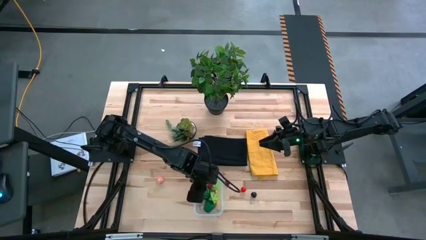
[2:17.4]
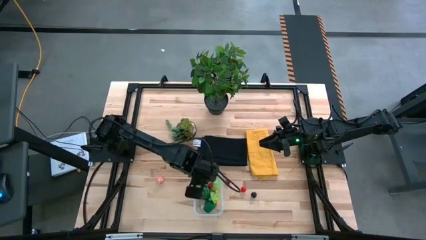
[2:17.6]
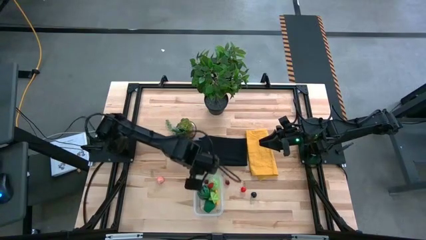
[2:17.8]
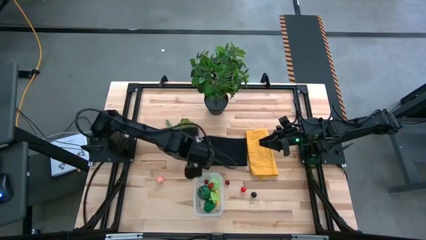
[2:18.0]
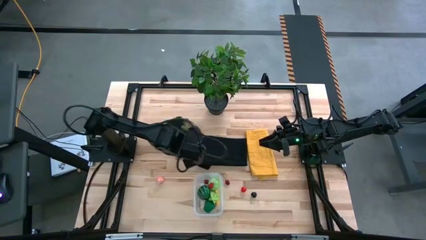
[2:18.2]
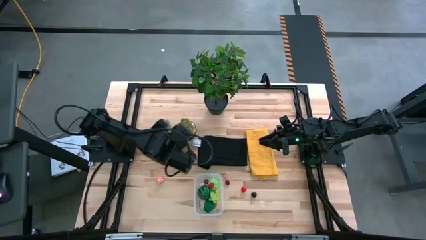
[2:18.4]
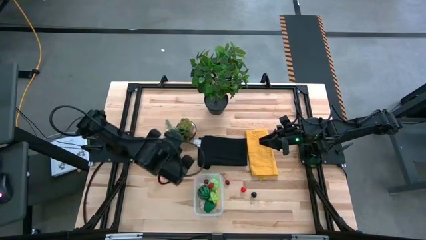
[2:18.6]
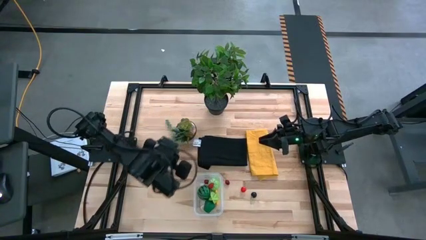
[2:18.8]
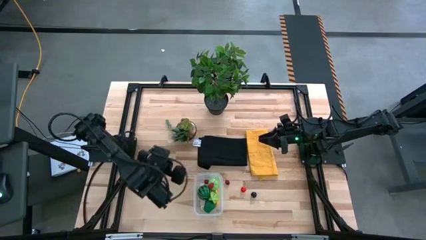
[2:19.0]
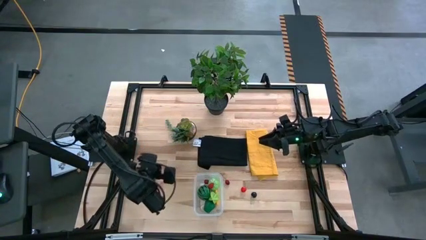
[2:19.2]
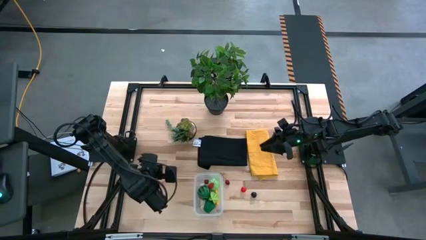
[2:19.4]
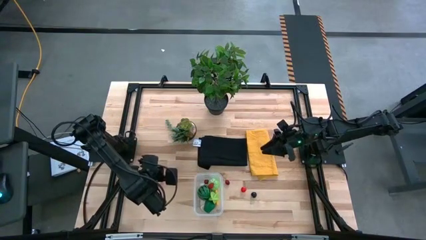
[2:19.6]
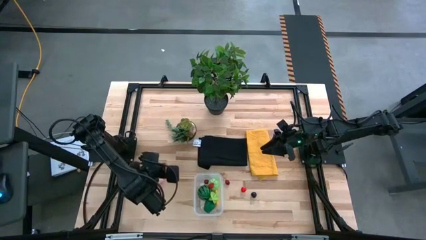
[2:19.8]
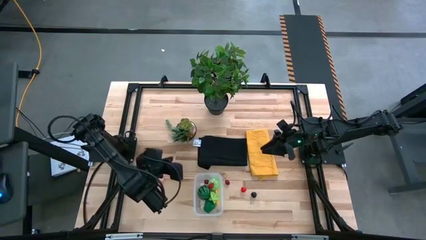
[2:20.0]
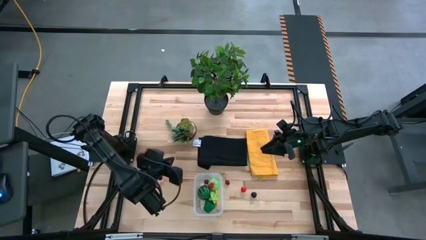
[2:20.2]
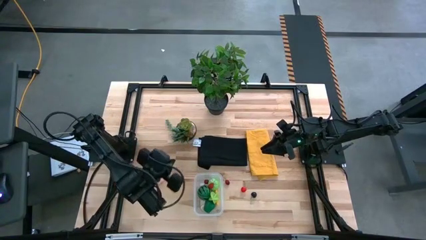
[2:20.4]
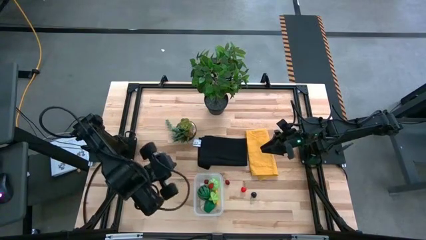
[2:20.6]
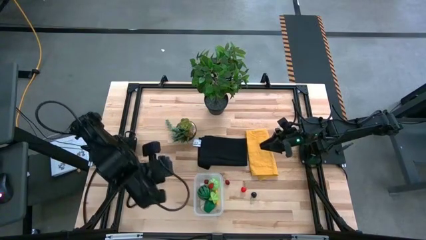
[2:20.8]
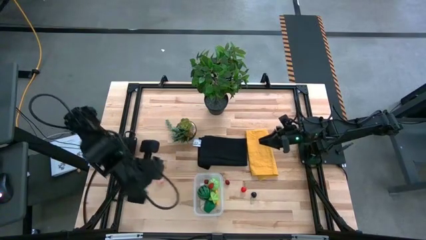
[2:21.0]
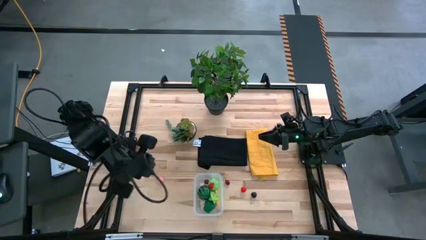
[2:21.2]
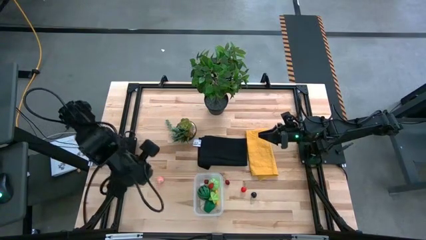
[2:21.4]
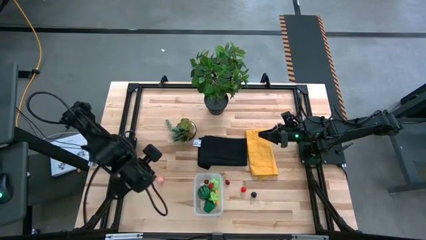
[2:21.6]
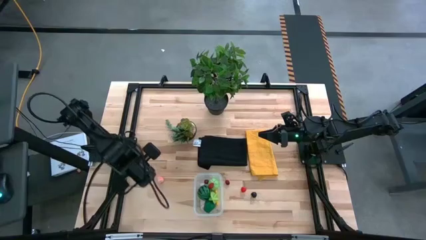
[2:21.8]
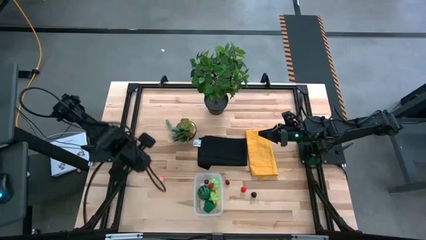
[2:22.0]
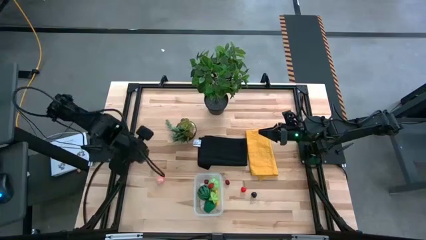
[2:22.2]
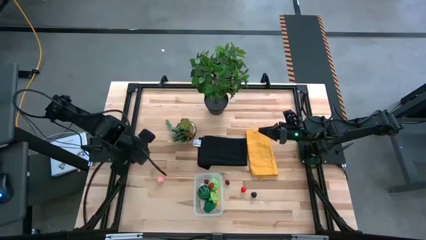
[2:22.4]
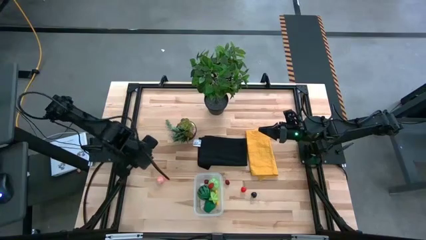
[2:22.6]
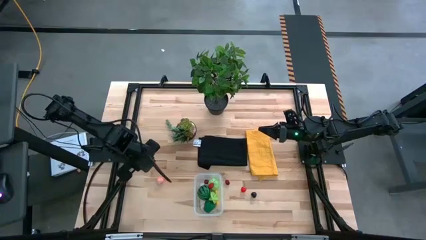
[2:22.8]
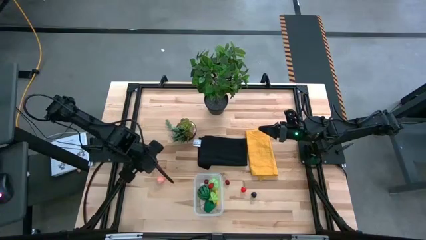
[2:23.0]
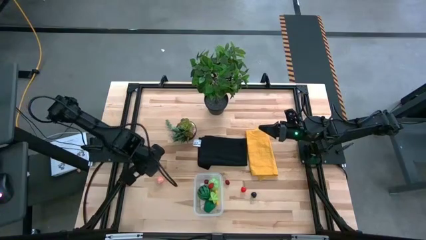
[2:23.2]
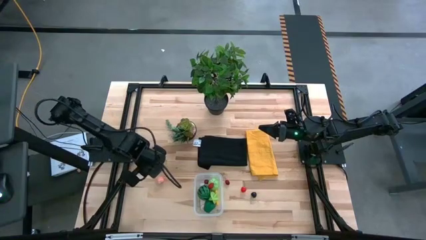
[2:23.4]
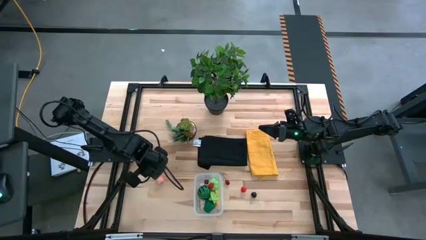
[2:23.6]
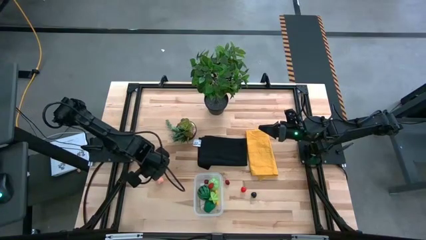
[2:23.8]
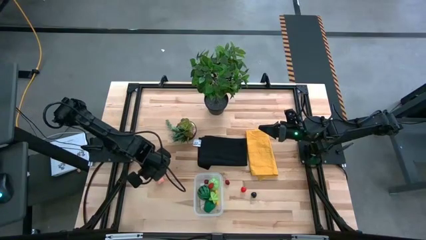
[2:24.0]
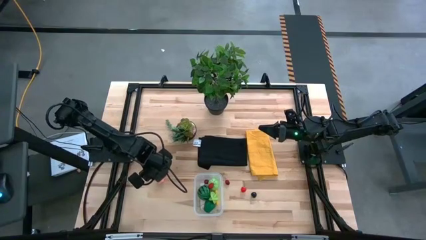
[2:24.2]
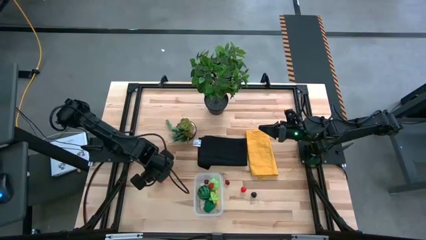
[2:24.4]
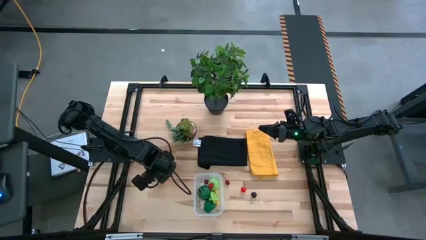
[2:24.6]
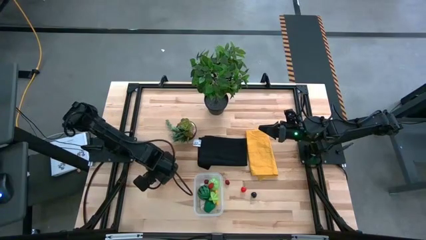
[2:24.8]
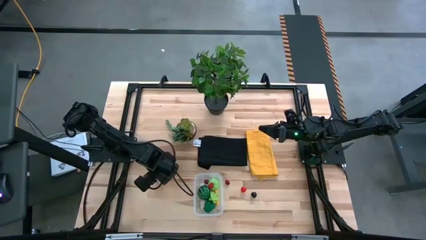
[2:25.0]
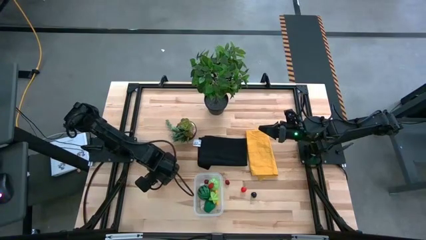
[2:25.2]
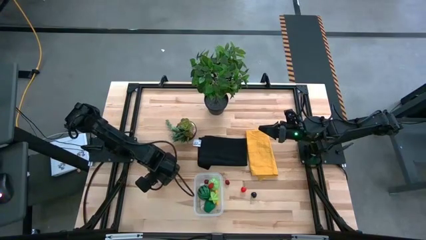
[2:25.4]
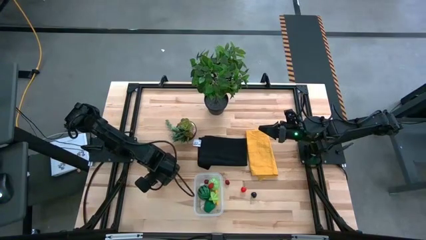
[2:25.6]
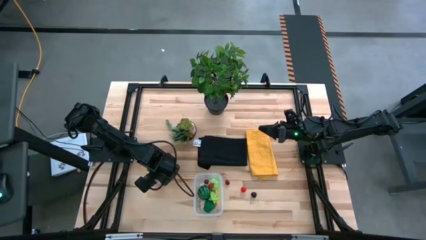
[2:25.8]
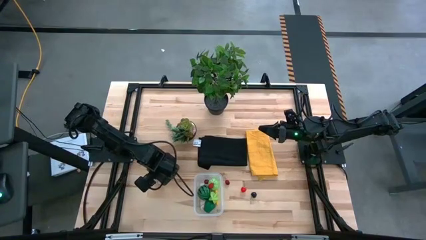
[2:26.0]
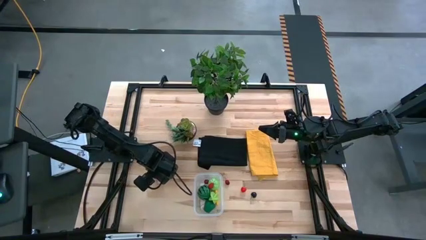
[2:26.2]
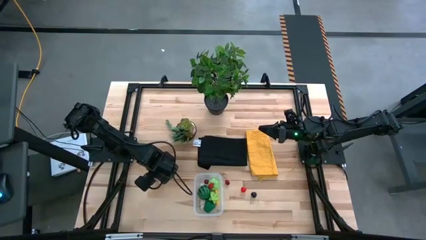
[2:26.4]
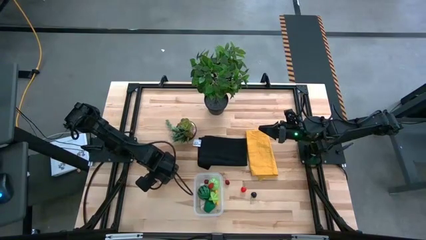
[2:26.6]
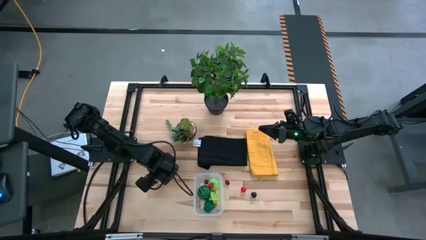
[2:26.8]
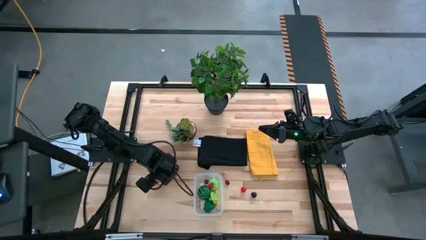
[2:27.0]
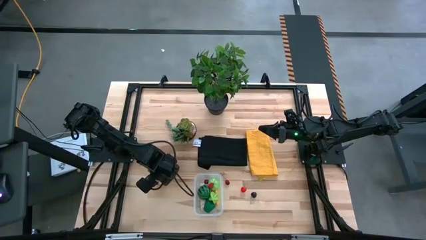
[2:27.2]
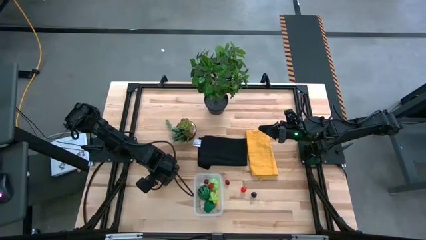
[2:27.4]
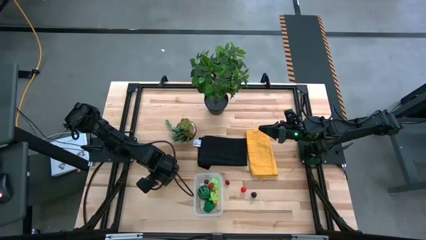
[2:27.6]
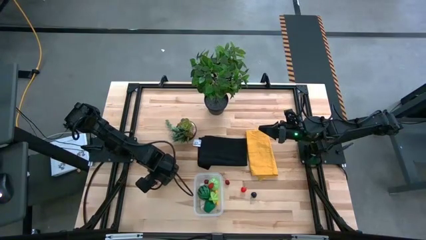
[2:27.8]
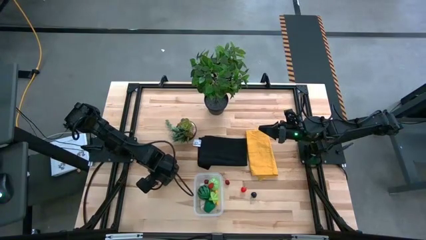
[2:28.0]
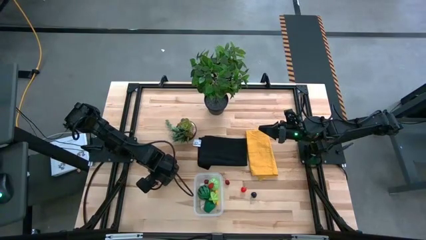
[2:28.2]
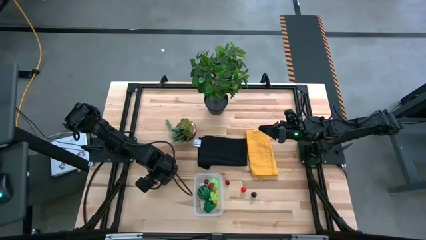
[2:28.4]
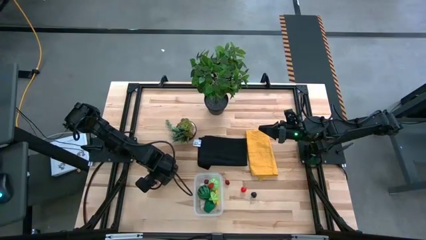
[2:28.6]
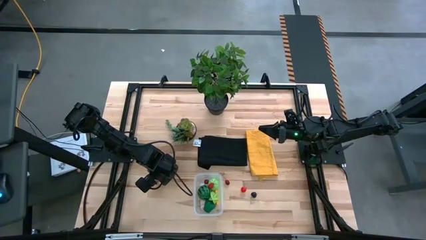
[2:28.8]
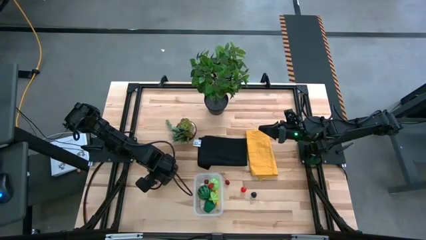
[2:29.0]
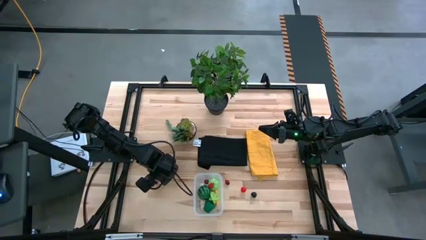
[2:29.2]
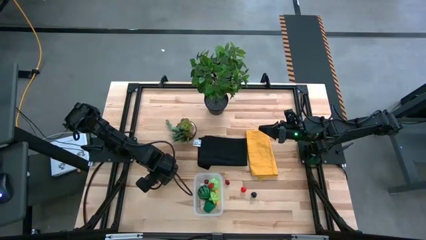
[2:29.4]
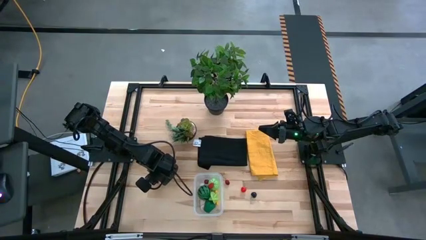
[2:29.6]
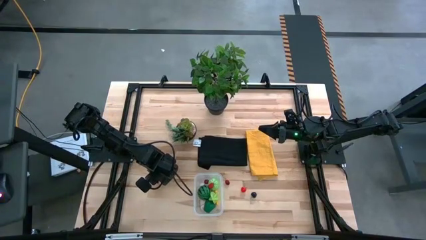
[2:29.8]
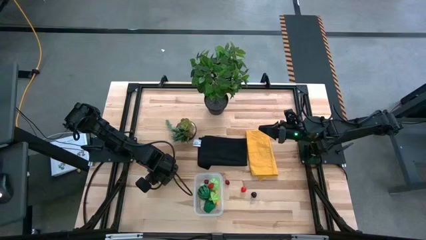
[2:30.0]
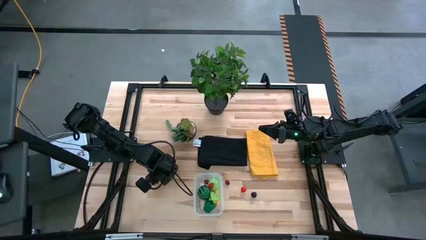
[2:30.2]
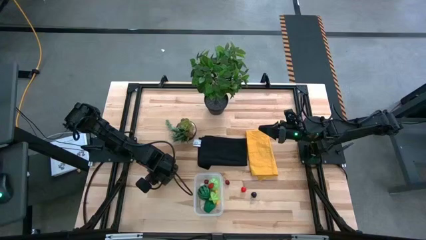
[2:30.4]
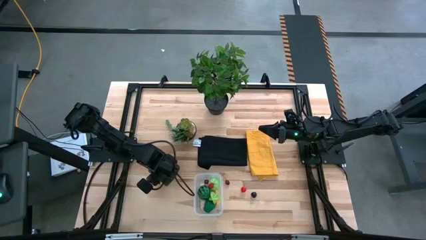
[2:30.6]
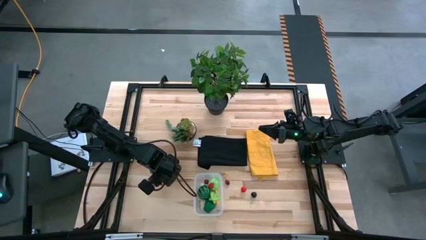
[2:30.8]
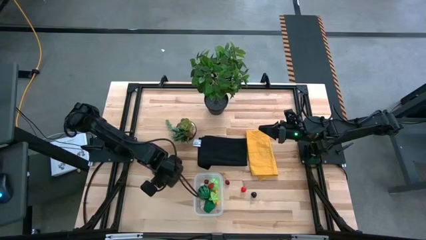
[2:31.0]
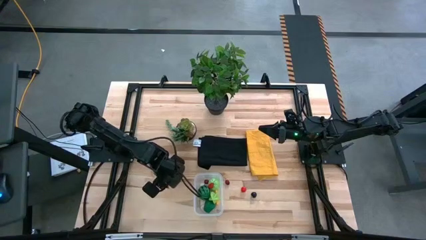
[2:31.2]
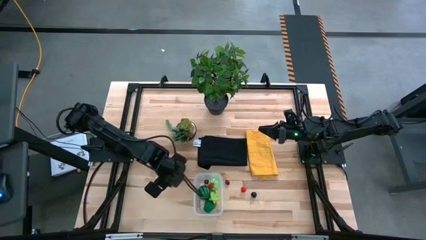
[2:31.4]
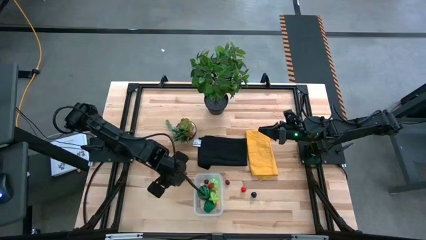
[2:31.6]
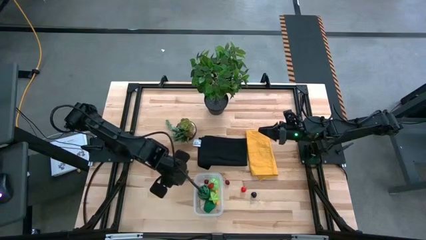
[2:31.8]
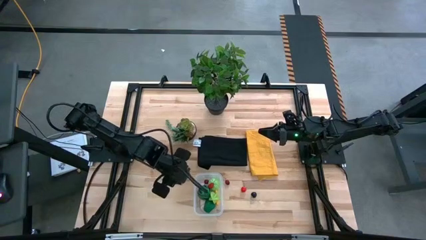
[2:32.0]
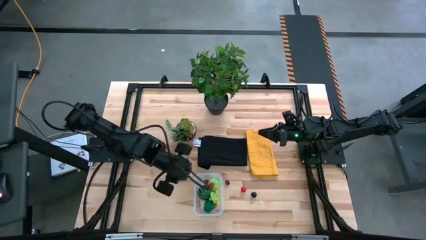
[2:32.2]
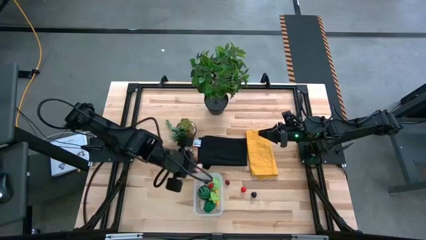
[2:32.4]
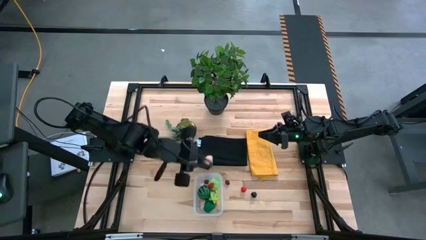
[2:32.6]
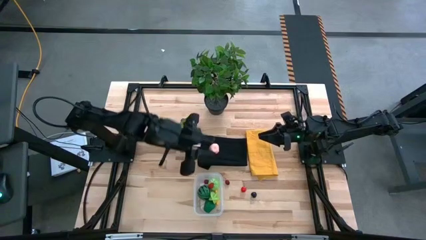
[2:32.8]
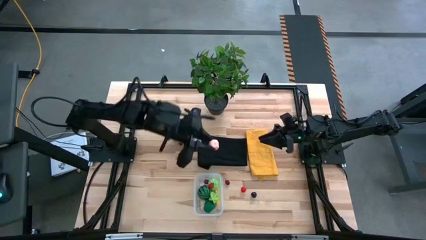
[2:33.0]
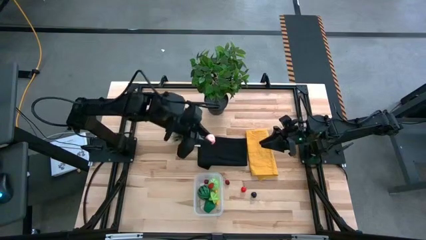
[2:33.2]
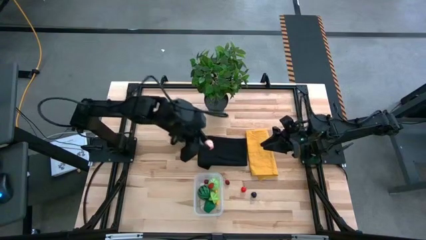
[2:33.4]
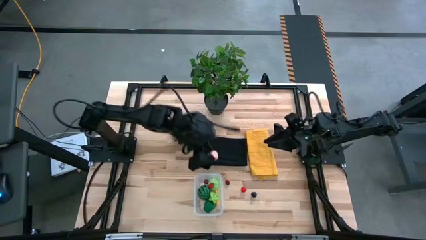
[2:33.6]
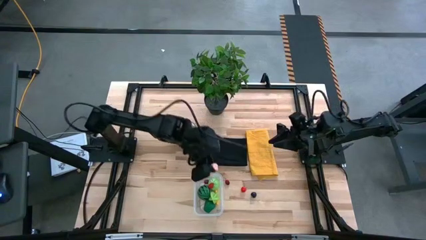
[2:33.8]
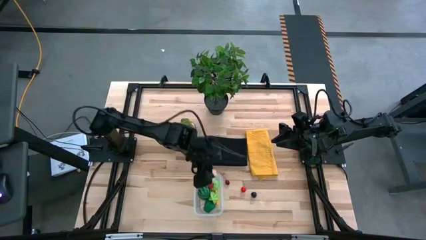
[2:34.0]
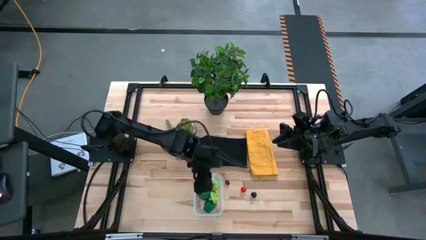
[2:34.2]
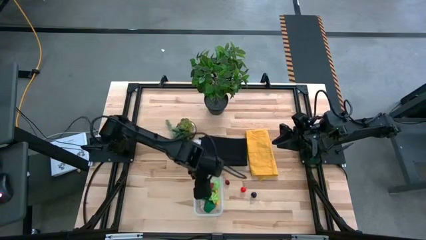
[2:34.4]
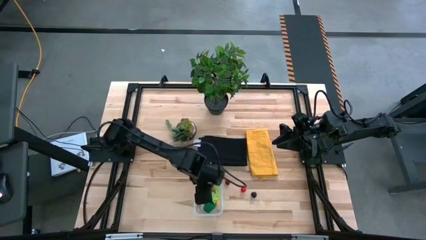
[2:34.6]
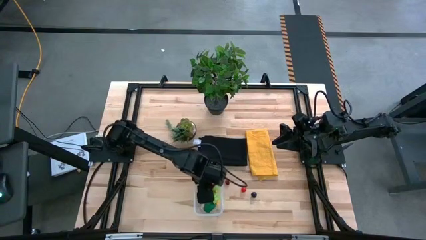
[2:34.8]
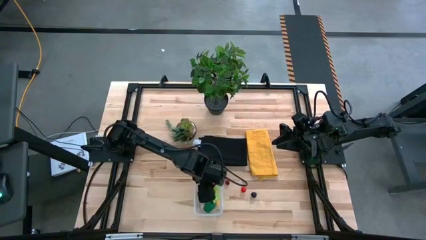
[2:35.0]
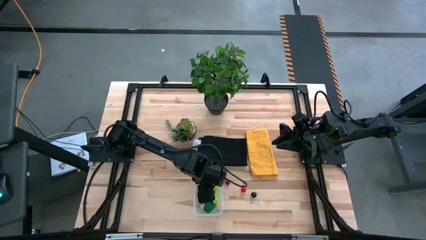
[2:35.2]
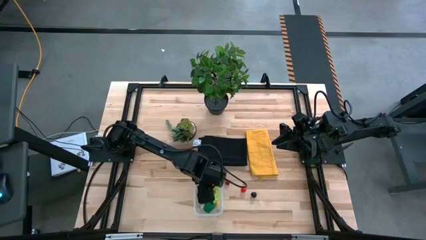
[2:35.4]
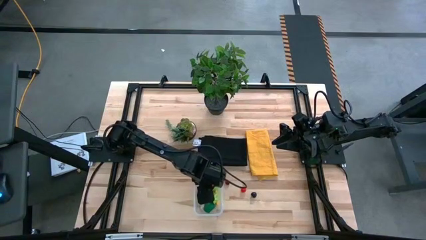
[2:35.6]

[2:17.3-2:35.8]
Task: Pick and placing Produce into tupperware
Put the peach into the bin
